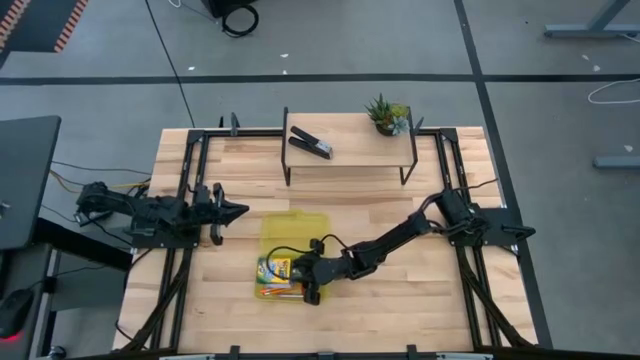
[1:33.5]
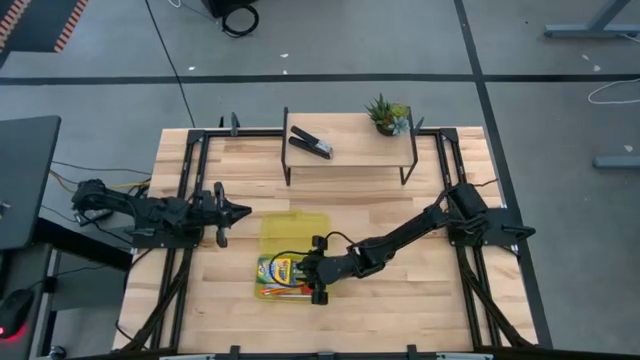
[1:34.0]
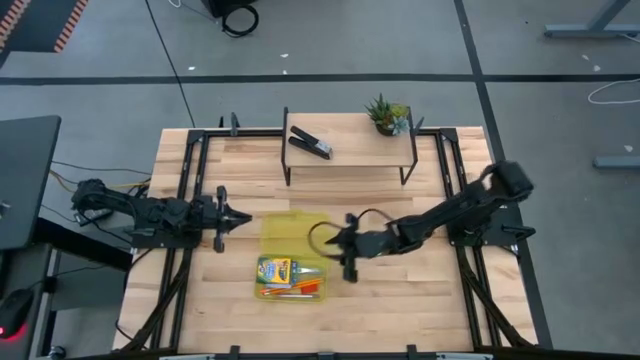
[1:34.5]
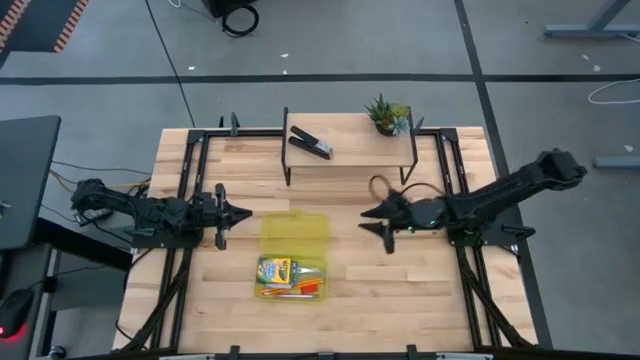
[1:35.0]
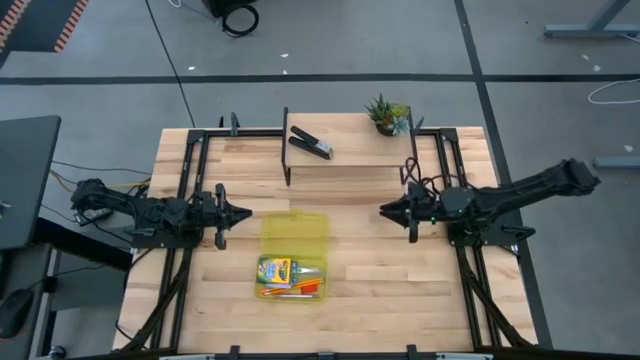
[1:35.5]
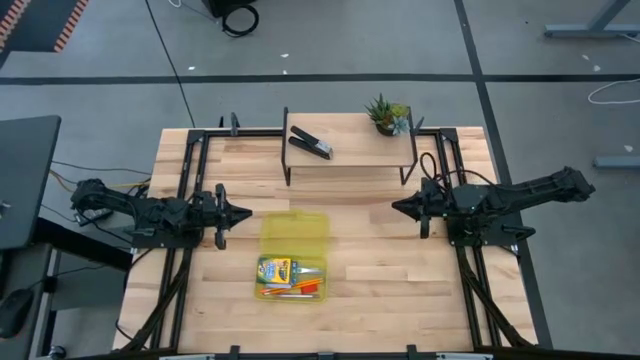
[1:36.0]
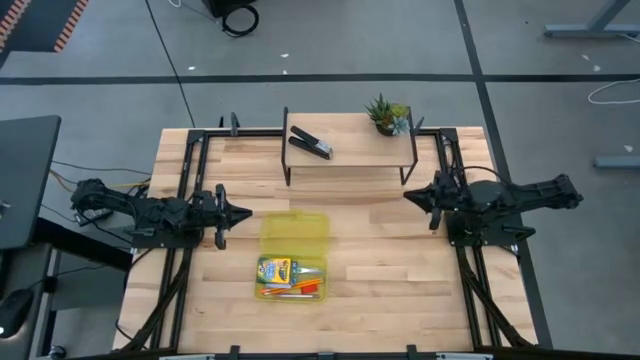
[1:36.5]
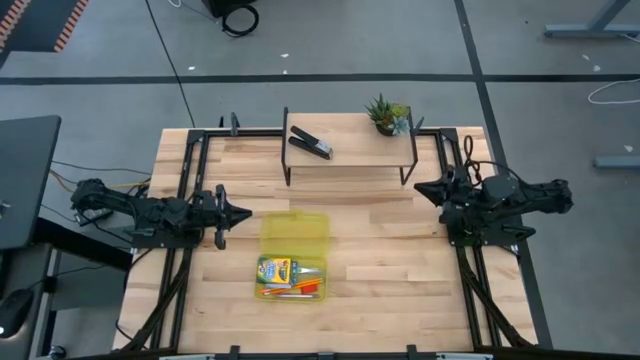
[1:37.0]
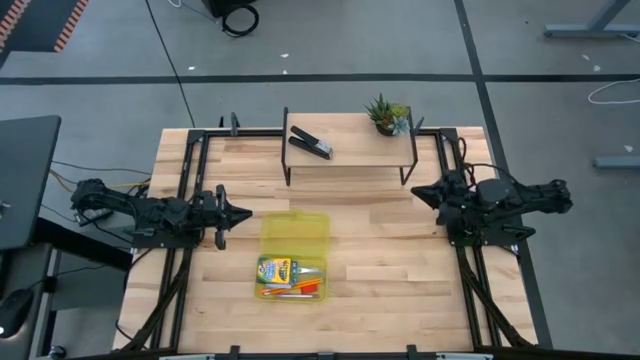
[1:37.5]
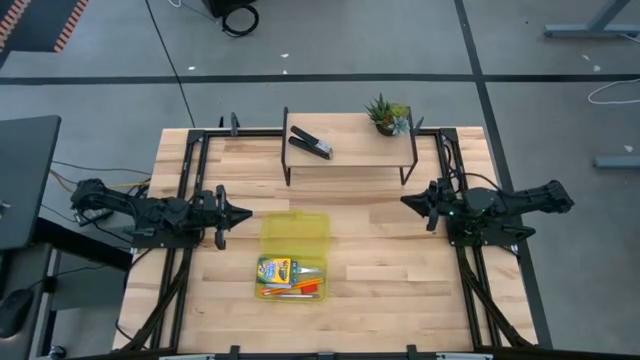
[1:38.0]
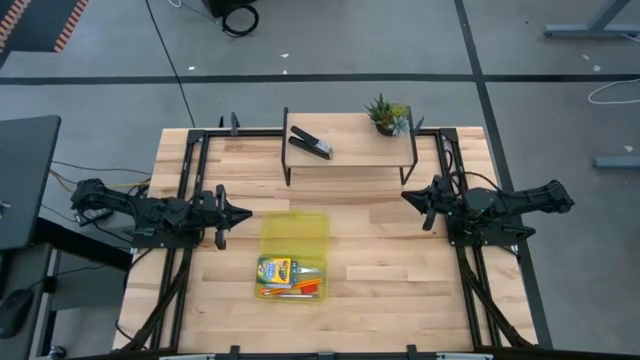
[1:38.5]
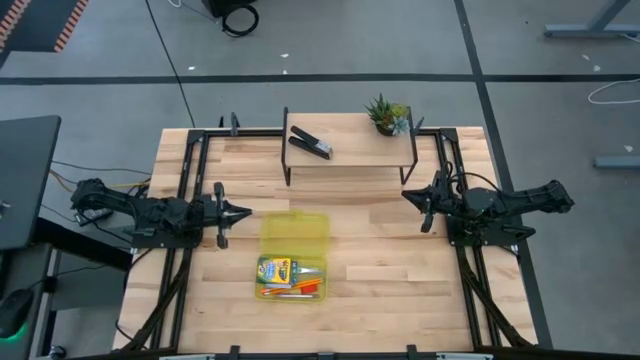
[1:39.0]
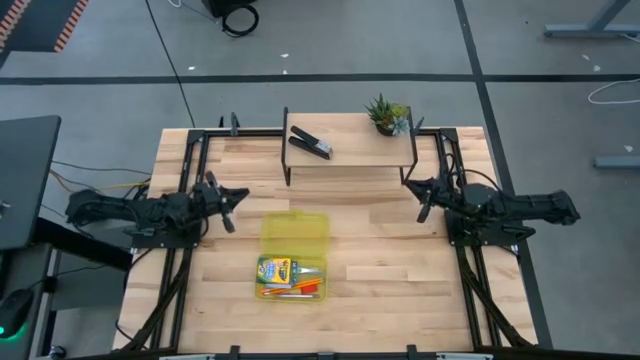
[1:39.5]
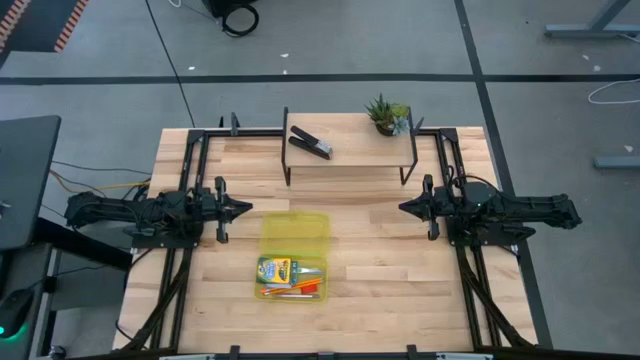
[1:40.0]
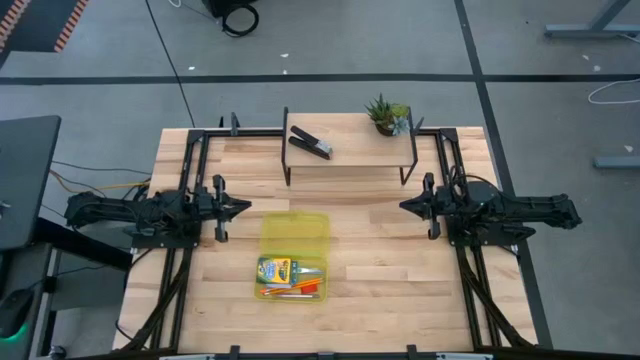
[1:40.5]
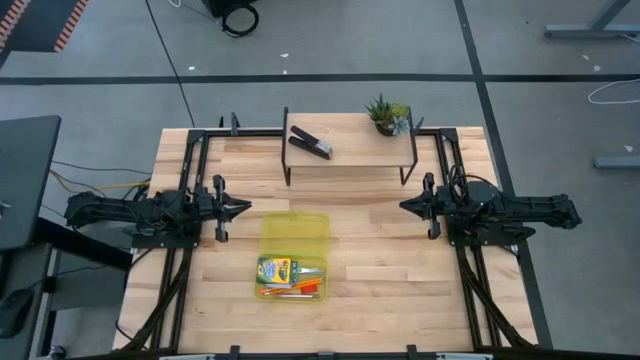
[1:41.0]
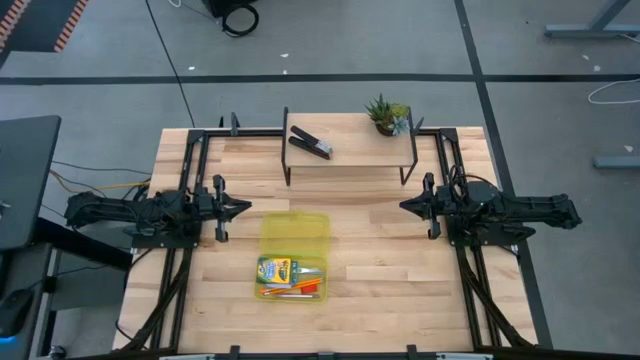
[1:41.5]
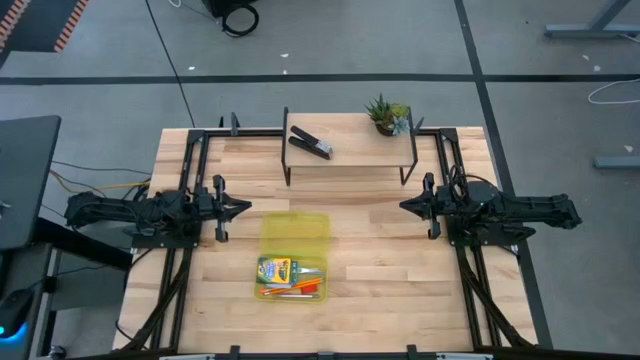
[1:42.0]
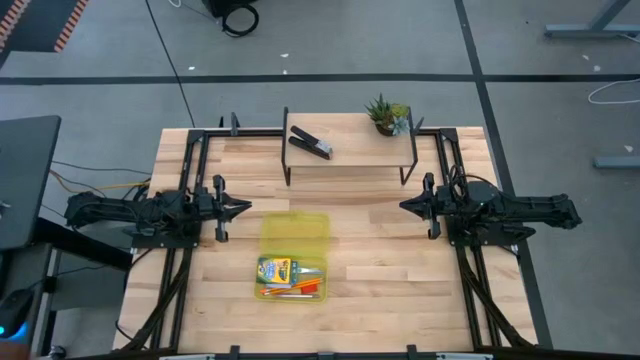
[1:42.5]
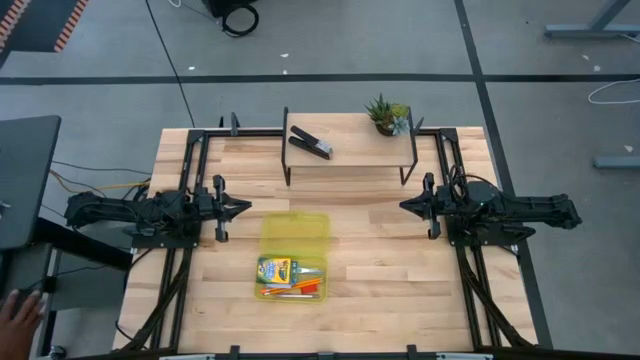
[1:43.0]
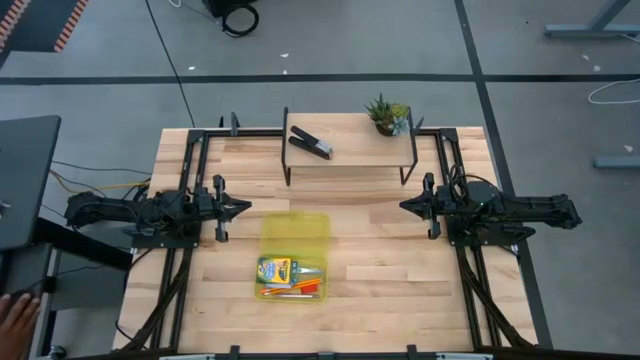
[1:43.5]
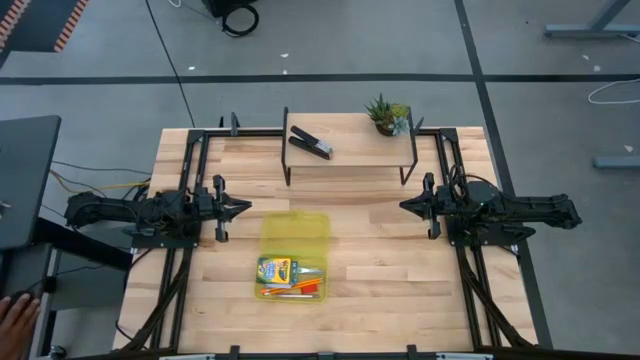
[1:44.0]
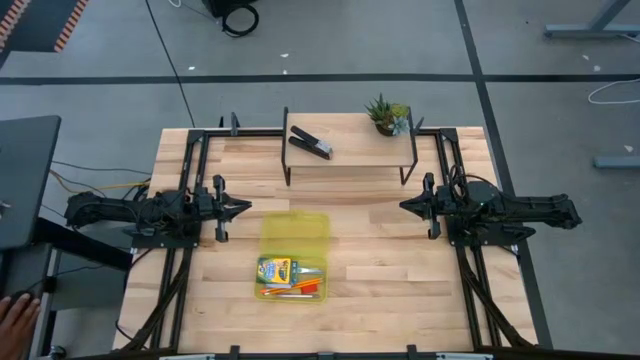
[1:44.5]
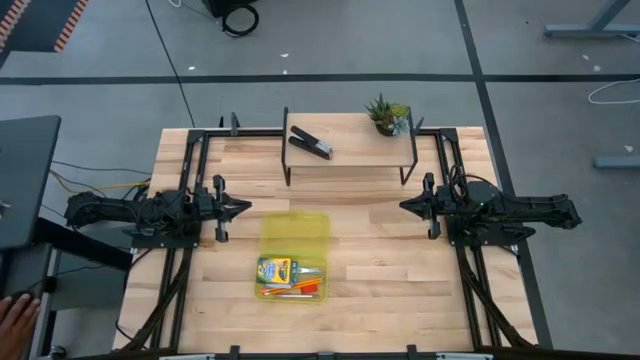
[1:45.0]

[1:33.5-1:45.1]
Task: Pack school essentials
Return to Home Position

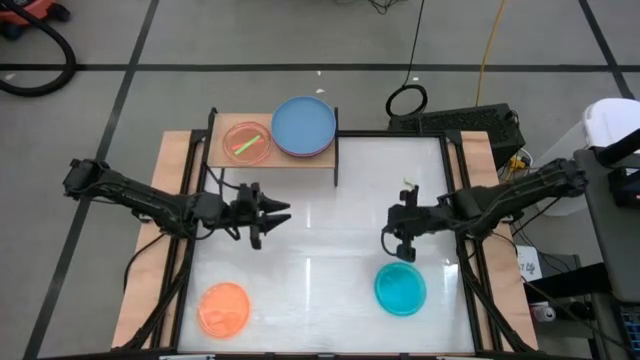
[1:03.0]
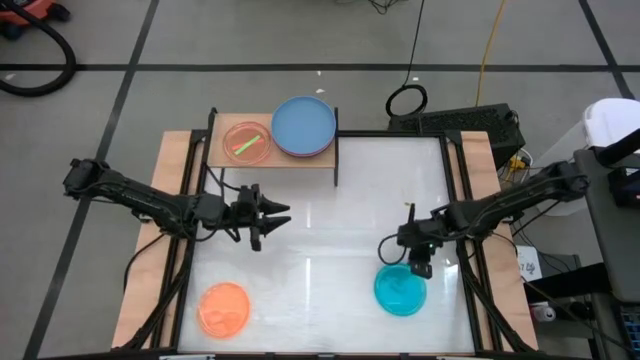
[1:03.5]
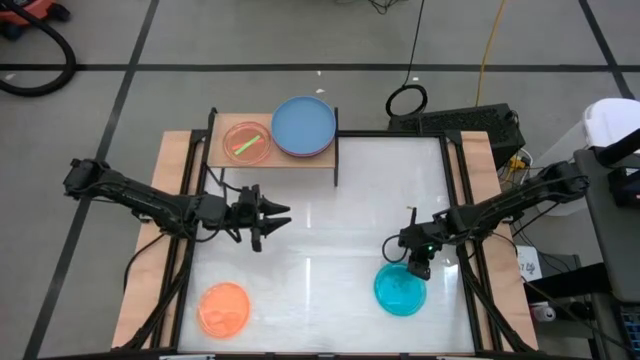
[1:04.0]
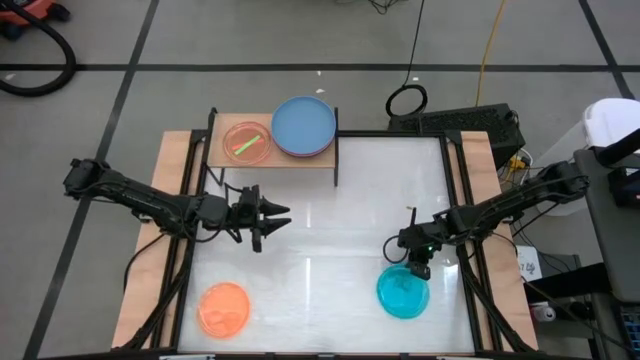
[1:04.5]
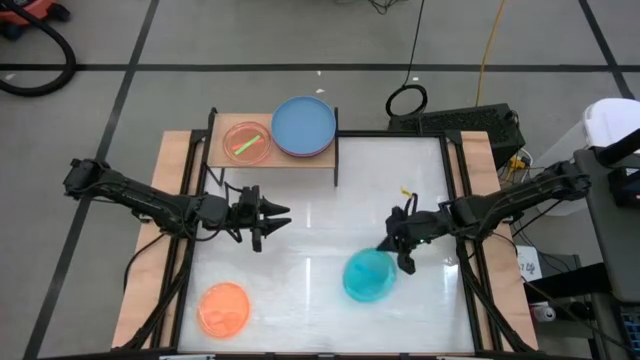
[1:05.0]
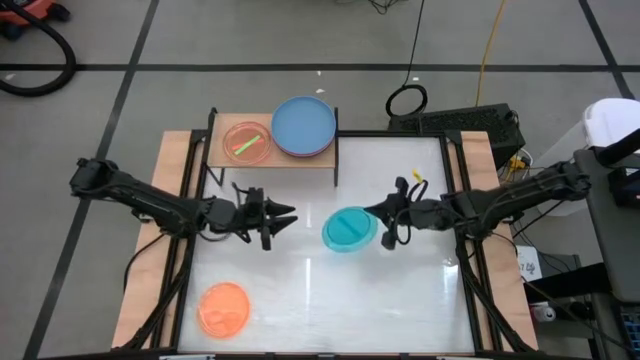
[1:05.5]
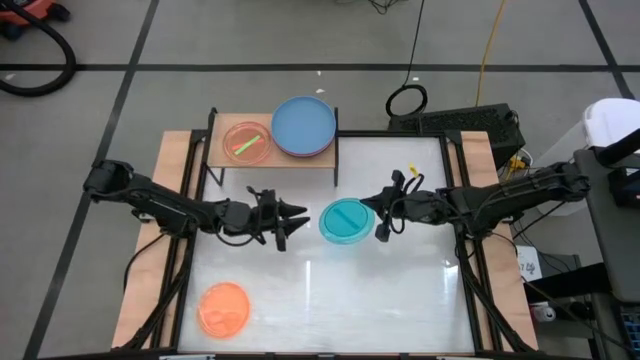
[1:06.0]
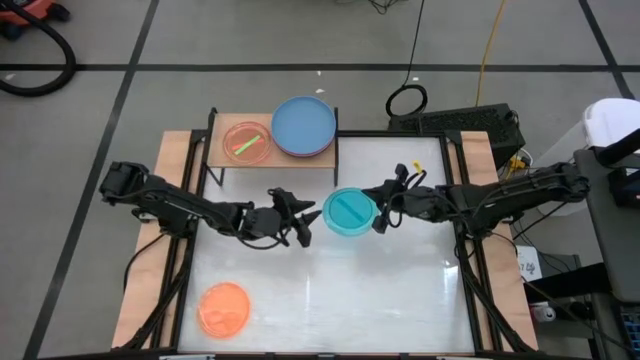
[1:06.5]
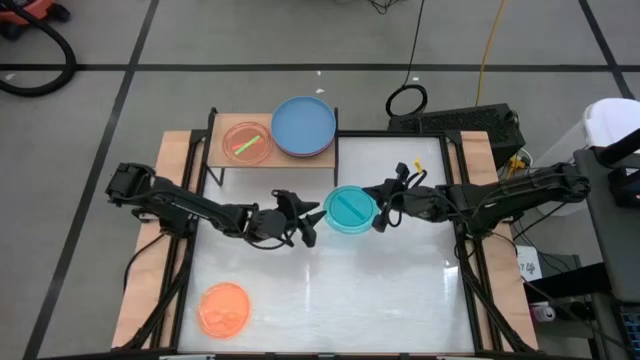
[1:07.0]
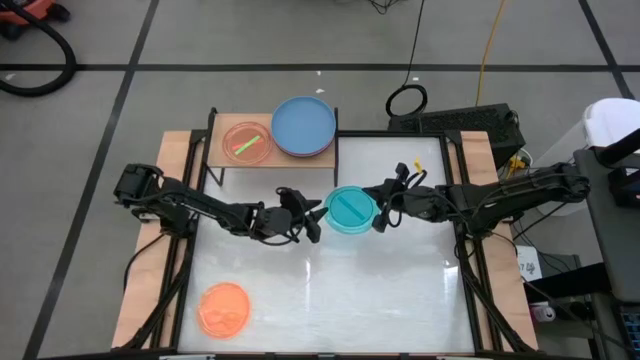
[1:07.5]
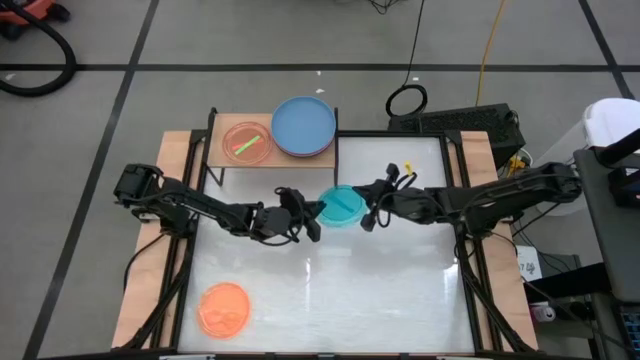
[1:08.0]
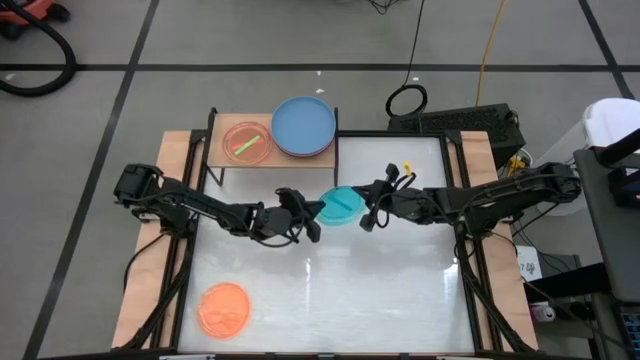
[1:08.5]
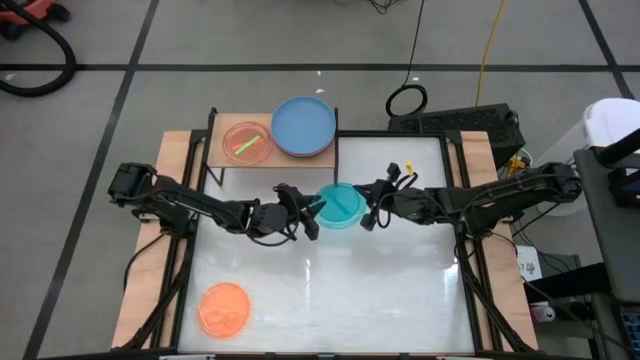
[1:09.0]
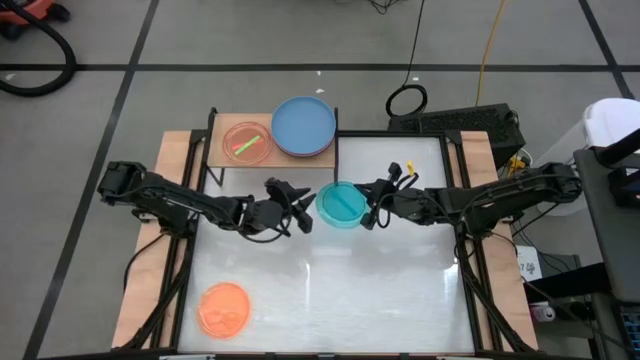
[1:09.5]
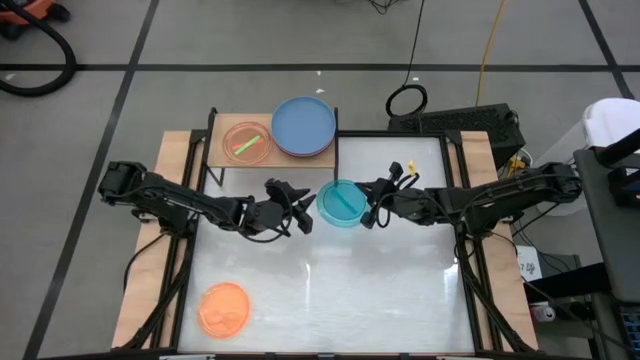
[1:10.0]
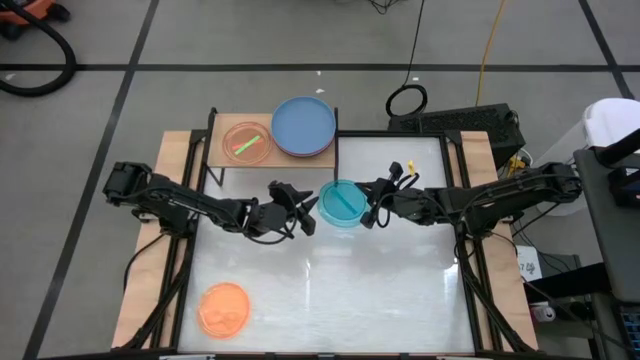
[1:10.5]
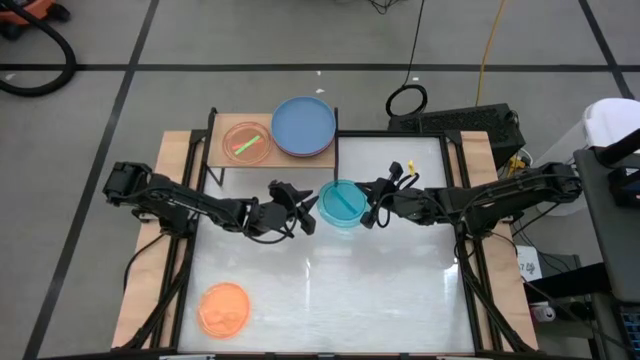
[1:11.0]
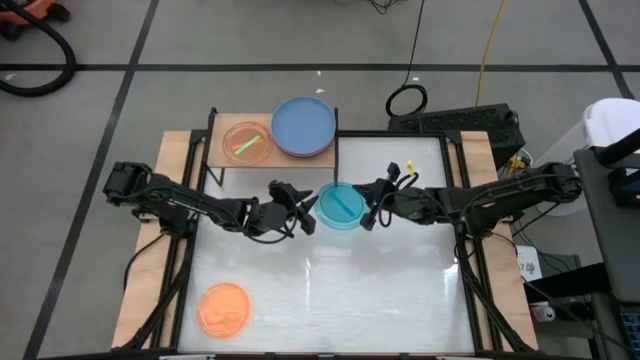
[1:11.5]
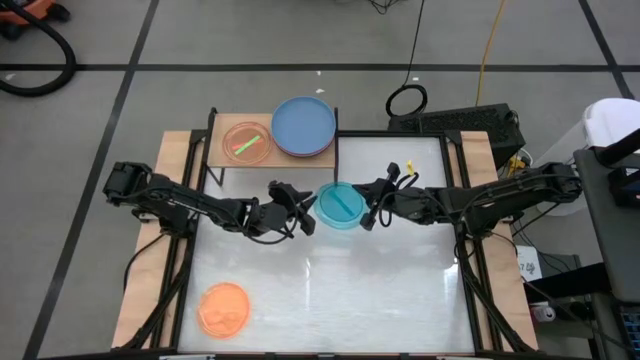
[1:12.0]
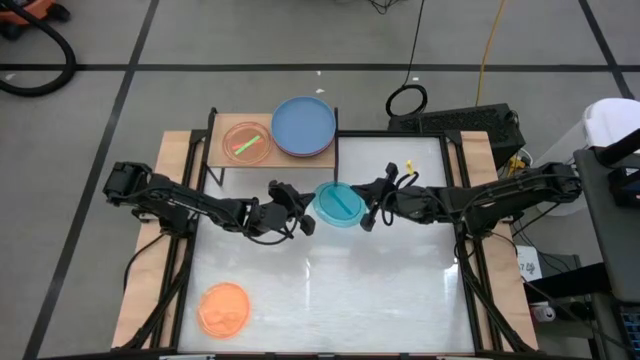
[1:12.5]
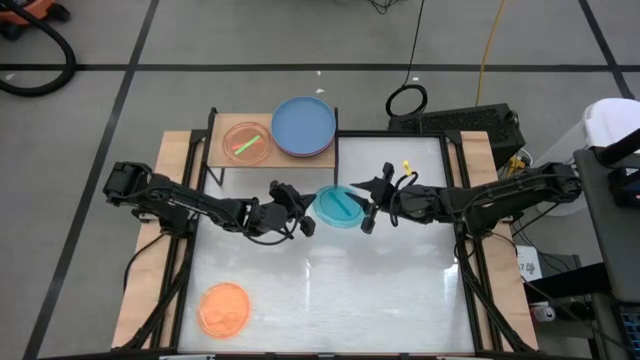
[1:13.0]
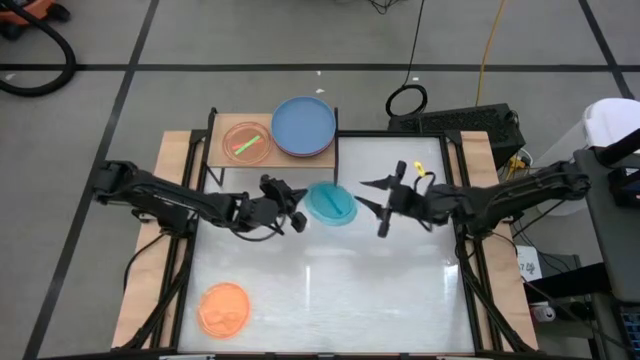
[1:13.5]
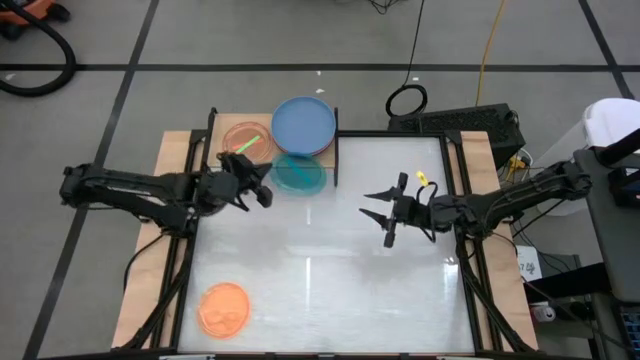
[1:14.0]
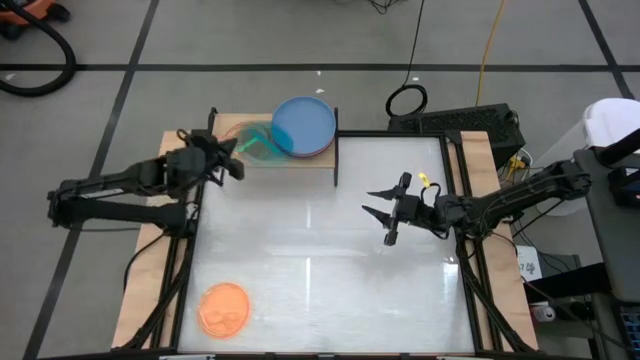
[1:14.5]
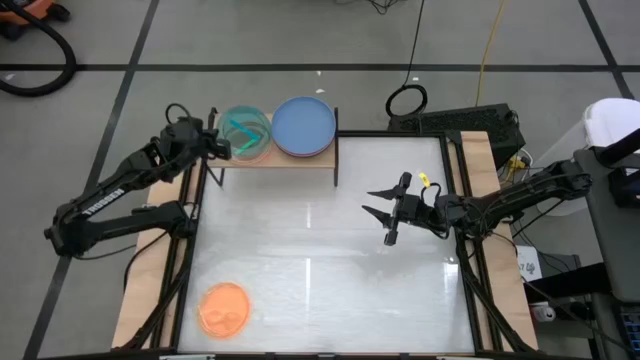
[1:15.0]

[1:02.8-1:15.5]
Task: Place and stack plates onto a shelf
Stack the transparent blue plate on top of the green transparent plate on the shelf
